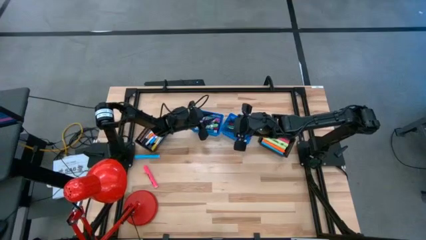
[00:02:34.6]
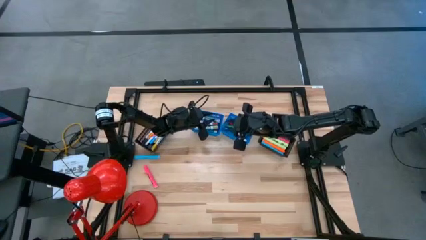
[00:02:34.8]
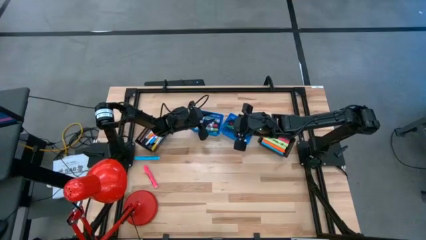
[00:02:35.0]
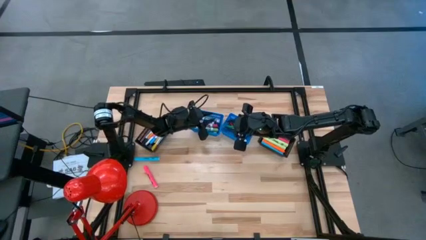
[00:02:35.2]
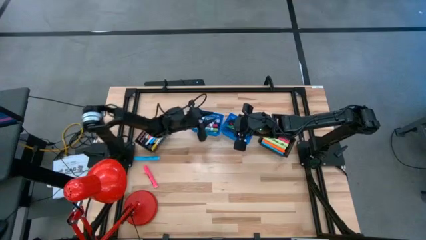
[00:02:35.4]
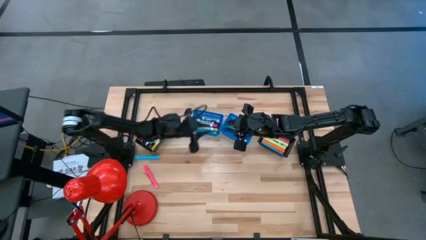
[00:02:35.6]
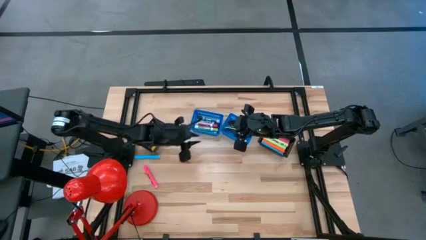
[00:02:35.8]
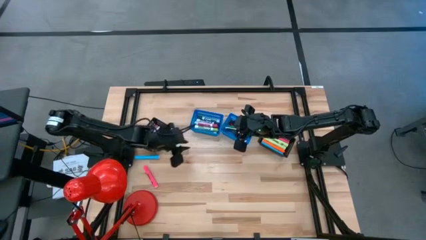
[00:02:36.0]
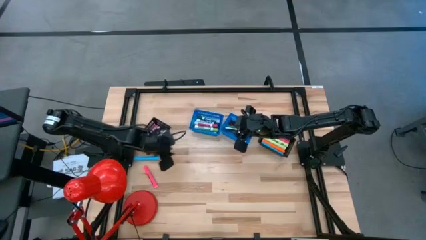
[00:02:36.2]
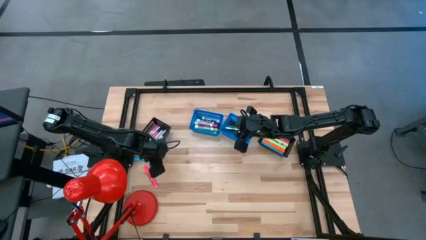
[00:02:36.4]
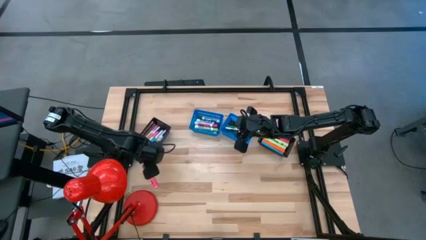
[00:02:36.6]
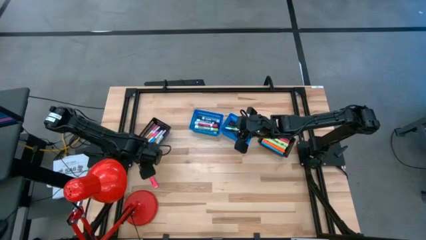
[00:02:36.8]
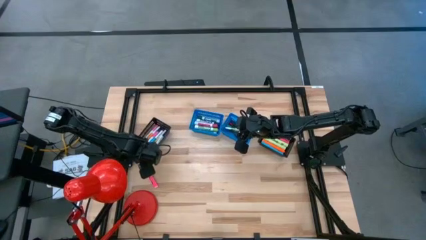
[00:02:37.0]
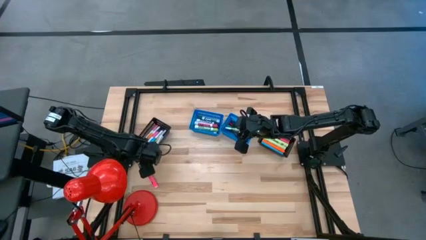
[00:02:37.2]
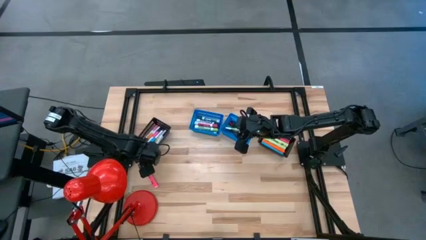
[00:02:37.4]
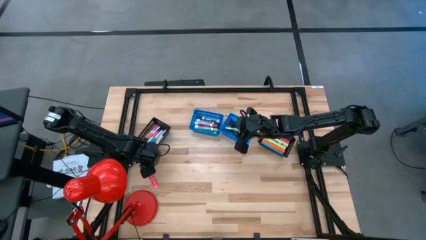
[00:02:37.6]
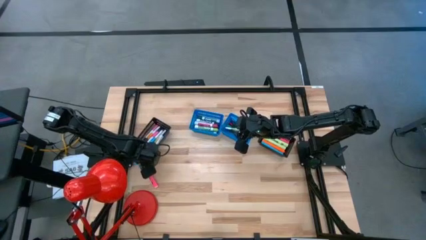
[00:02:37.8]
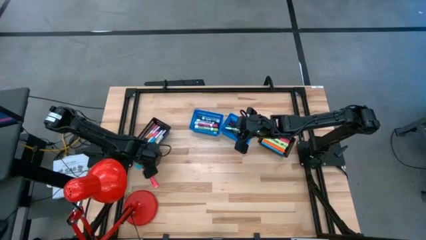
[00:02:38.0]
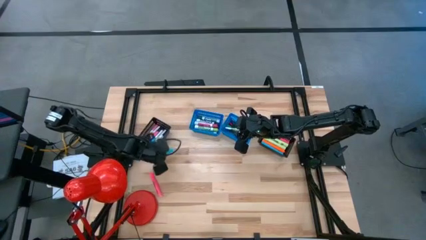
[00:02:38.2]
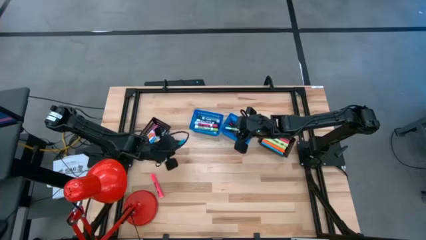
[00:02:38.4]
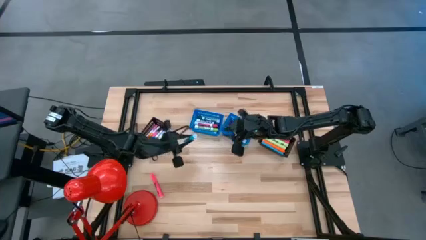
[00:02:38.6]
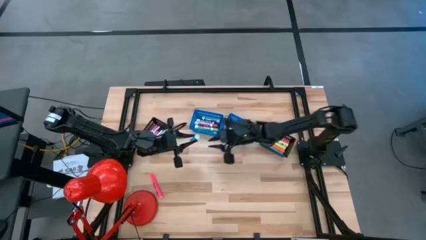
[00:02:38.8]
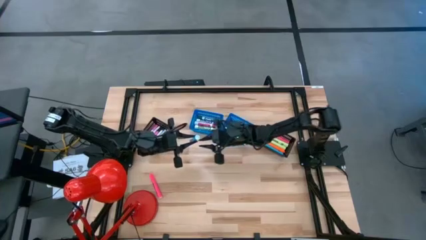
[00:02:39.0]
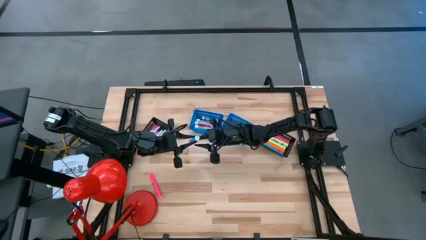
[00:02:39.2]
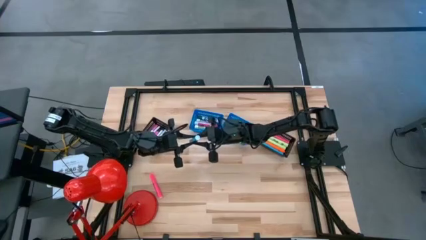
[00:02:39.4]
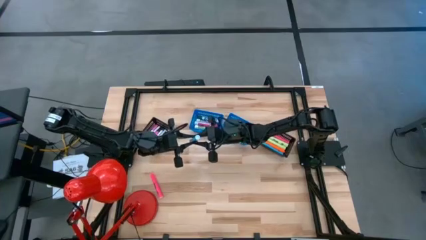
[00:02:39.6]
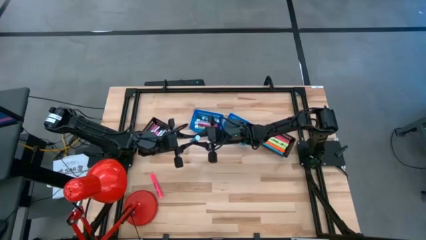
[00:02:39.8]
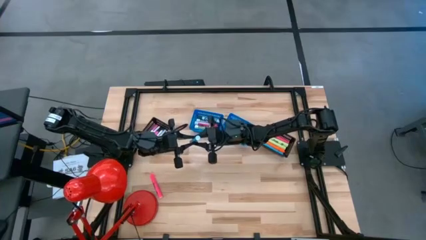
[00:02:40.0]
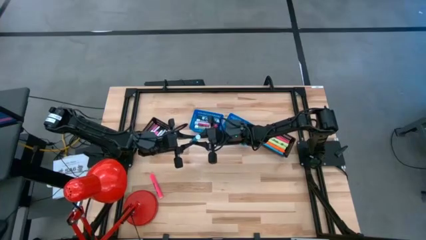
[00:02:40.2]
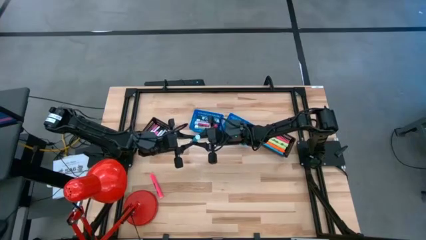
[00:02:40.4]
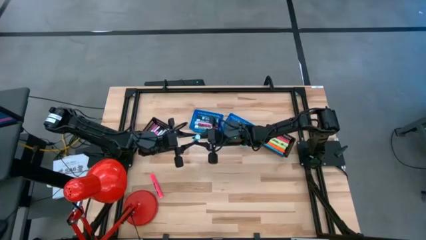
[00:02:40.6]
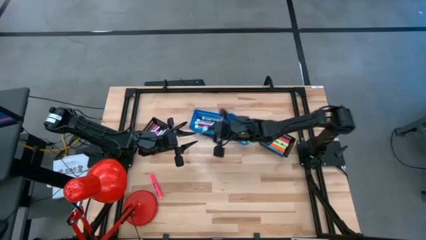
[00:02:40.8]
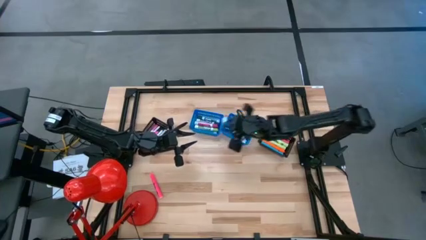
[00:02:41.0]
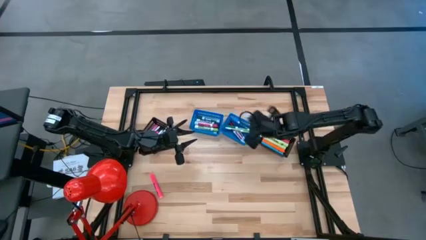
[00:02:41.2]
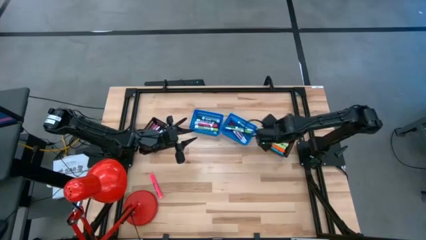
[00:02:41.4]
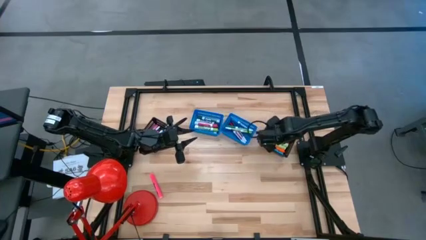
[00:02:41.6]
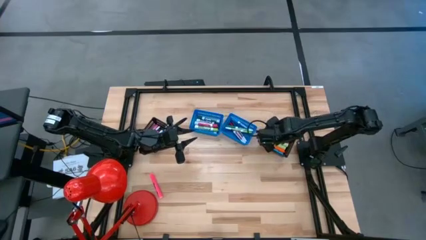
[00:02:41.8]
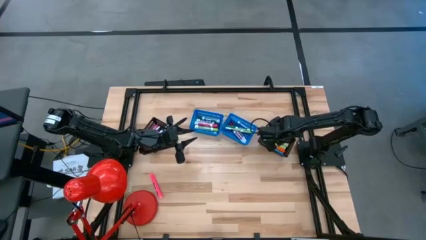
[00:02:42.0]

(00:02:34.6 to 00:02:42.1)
Task: Pick & Place Markers
Put the light blue highlighter into the right black bin

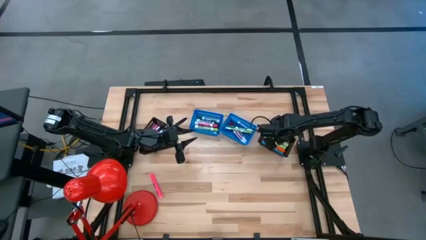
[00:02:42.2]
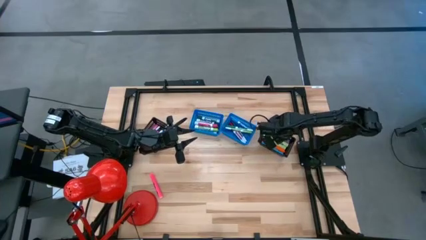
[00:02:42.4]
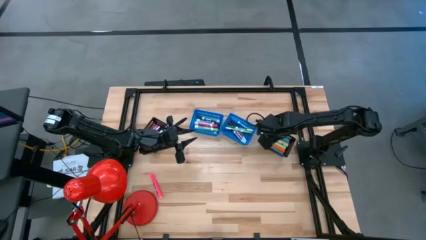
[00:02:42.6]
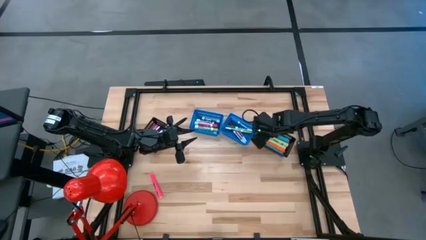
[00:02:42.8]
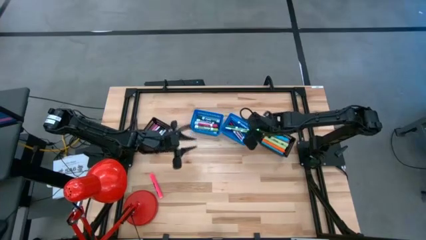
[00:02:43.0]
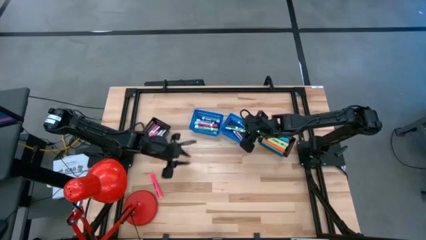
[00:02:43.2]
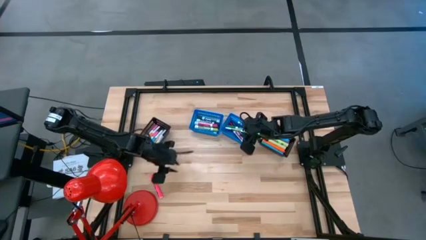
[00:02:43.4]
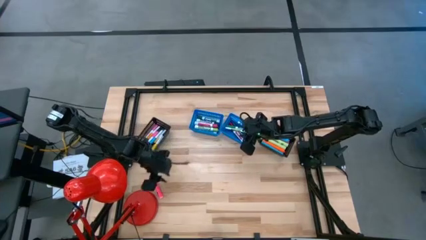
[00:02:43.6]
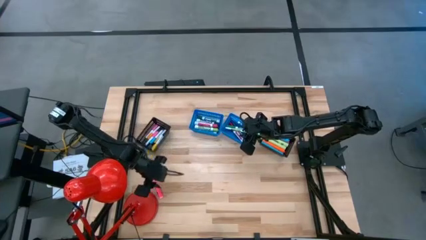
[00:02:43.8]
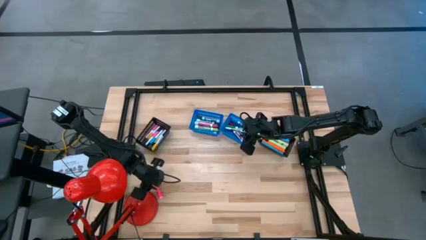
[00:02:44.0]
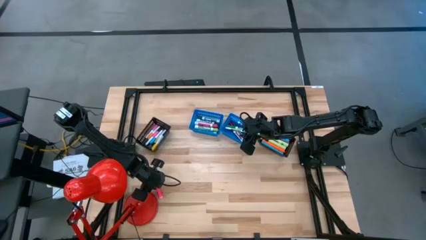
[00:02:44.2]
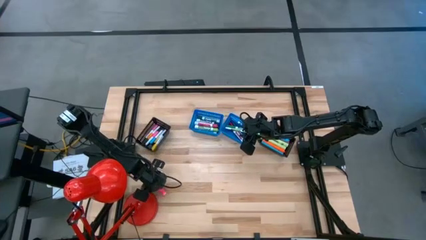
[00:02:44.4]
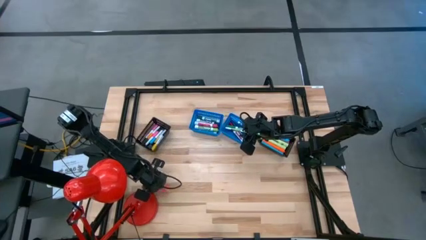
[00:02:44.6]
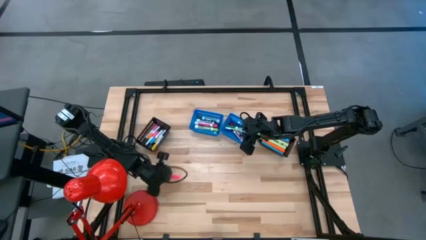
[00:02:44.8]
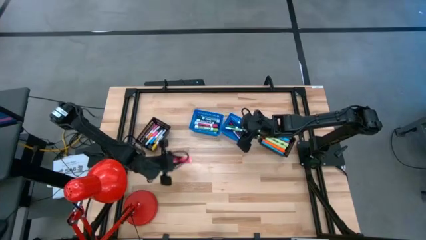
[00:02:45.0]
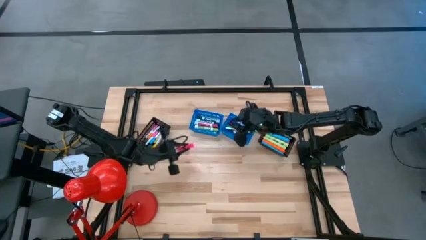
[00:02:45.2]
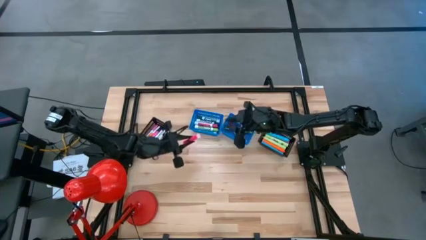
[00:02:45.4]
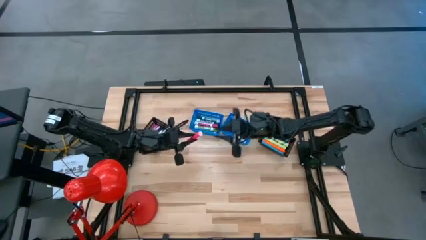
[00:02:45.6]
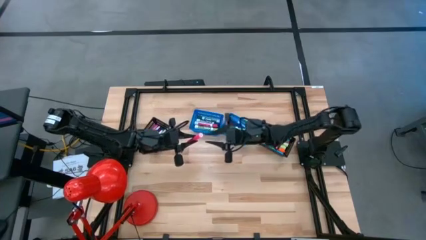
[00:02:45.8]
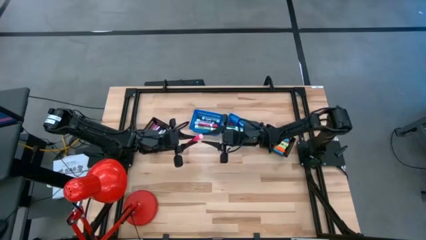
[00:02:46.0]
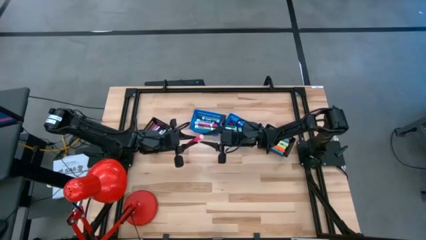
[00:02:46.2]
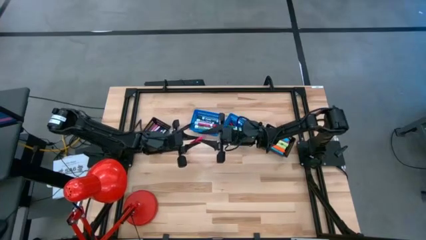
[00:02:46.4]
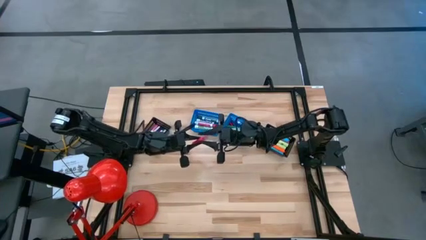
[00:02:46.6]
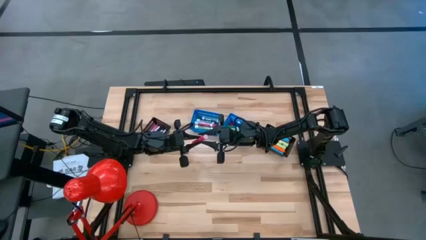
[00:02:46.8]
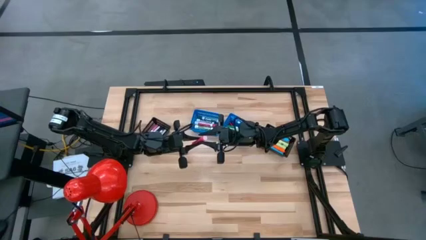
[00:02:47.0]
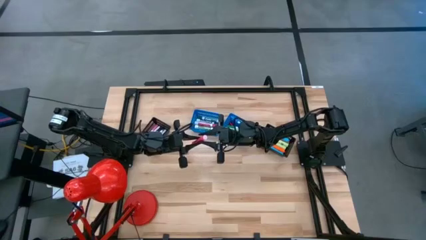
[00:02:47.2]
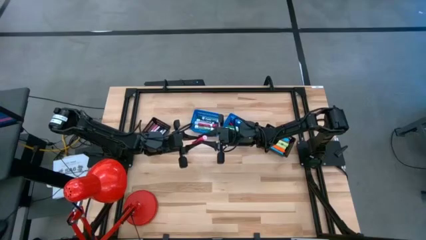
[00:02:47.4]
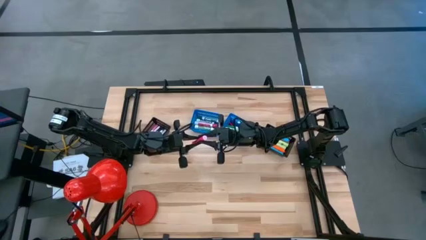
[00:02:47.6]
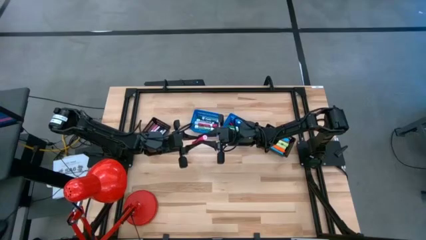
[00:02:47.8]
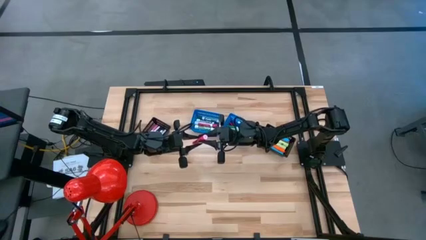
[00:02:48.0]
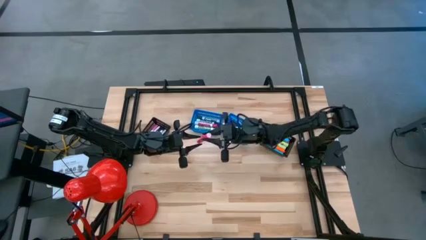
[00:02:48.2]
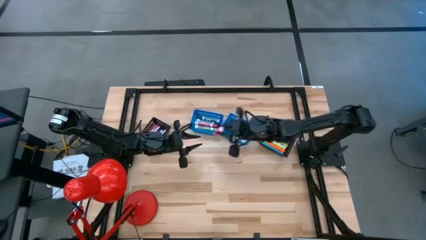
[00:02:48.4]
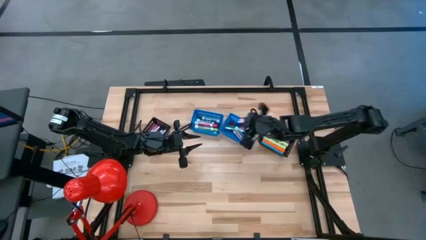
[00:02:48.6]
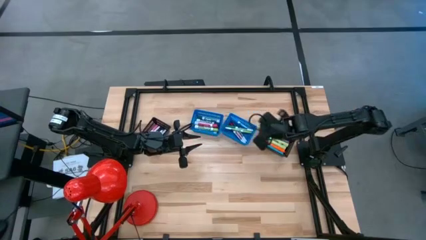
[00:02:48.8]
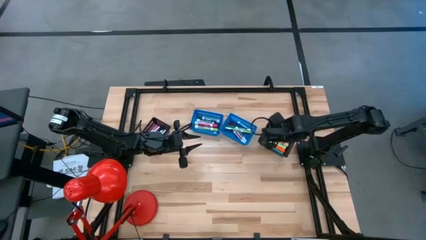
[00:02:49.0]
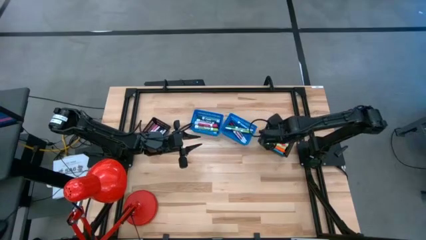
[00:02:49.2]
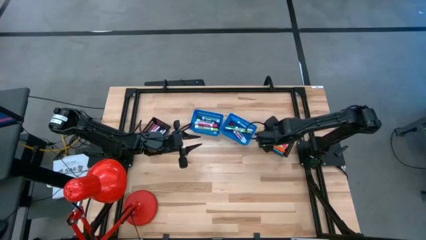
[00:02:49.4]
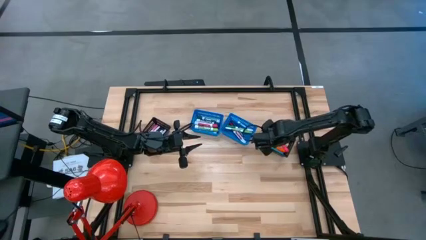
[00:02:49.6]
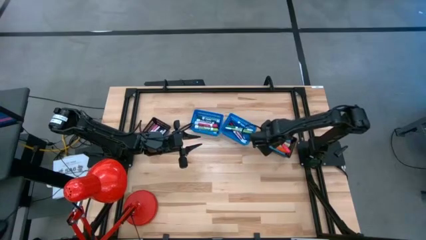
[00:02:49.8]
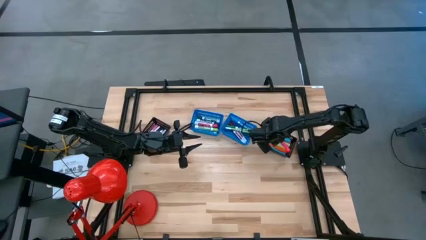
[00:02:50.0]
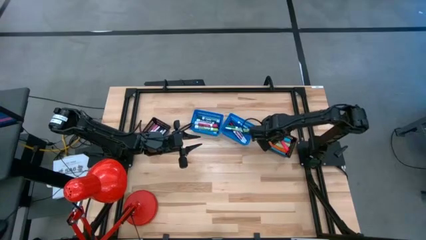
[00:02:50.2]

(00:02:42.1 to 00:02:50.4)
Put the pink highlighter into the right black bin

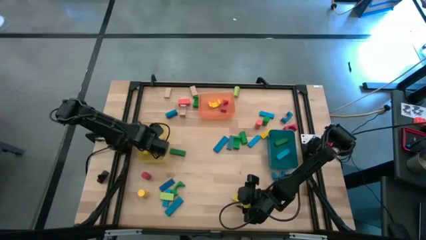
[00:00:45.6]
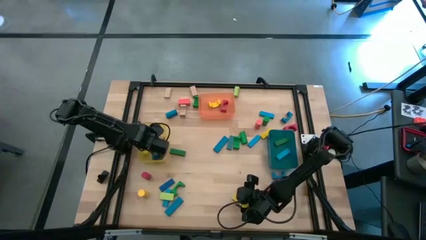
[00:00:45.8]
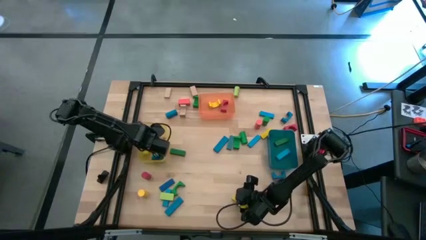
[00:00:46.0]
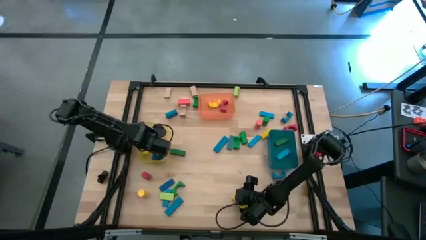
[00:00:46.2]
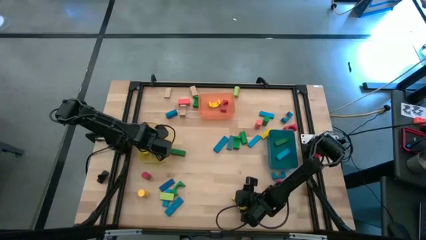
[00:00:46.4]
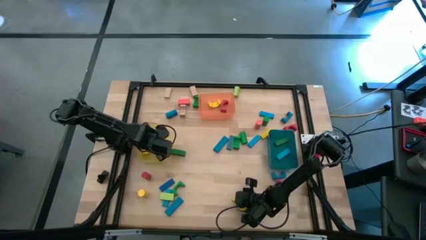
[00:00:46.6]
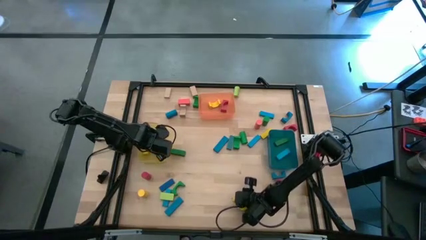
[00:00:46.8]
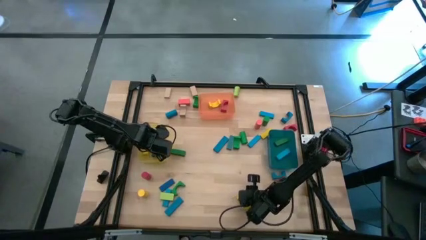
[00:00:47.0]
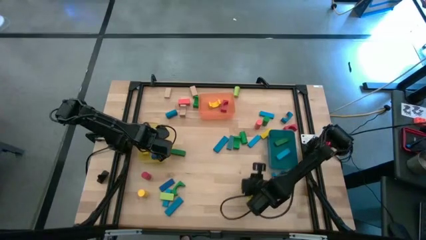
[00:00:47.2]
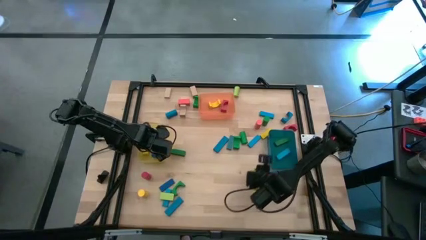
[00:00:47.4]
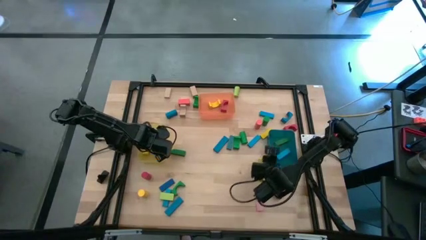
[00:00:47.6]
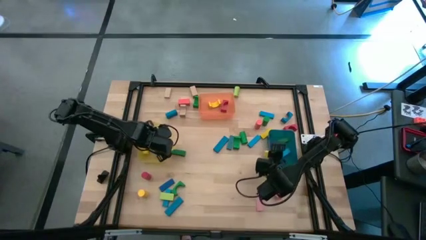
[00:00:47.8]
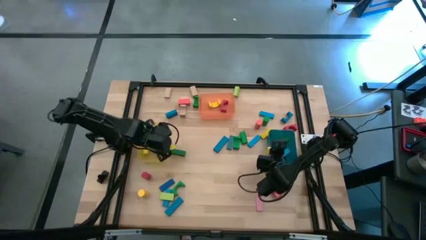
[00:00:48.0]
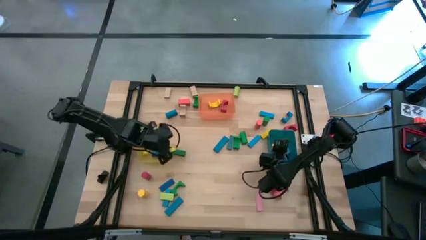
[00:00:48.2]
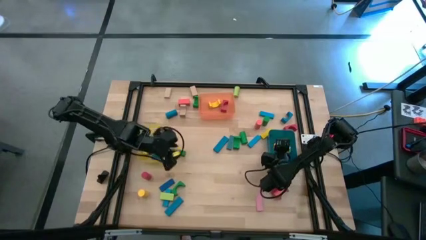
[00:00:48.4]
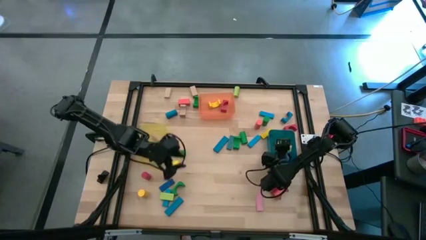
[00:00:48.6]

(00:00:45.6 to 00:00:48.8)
Task: Sort blocks by size
Put the yellow rectangle block into the blue bin
